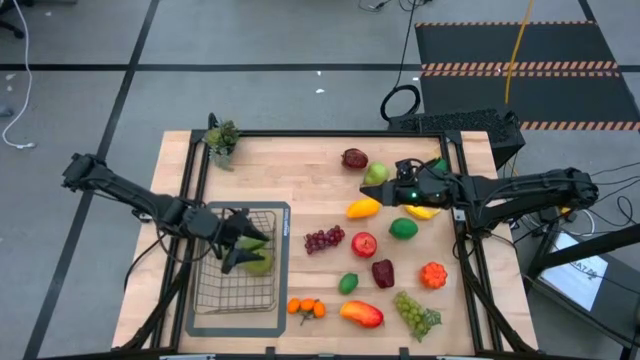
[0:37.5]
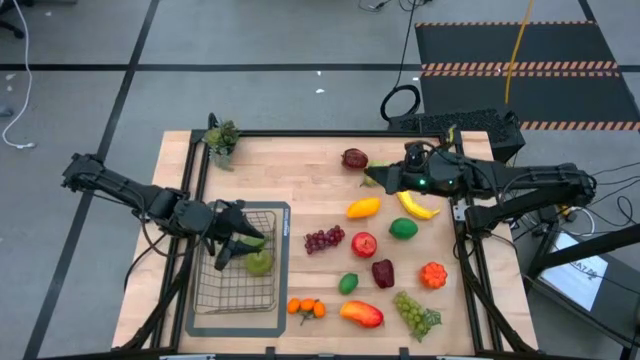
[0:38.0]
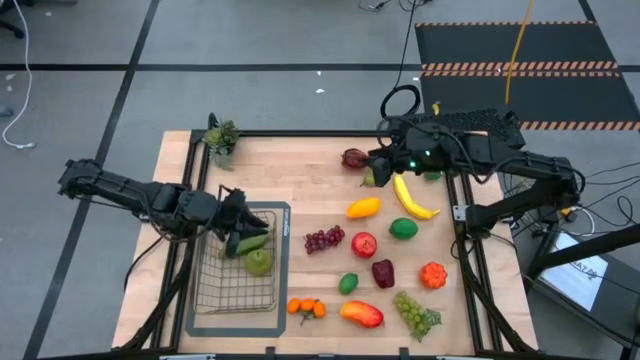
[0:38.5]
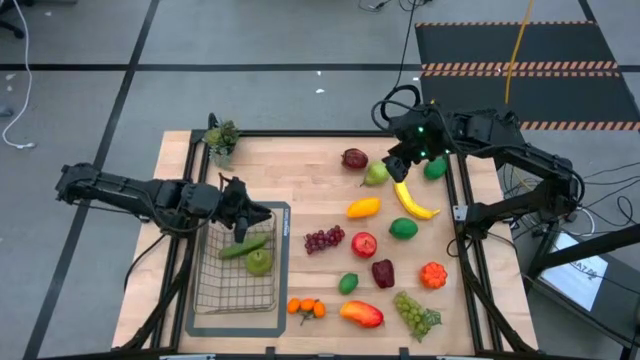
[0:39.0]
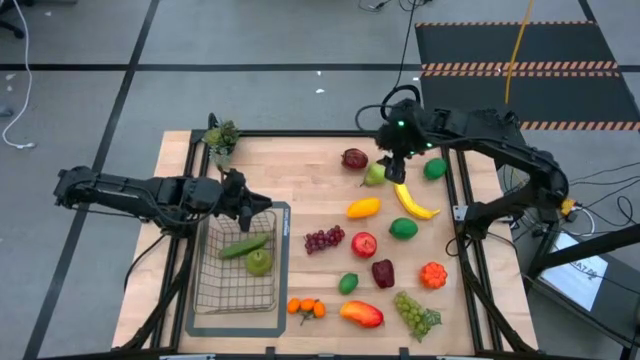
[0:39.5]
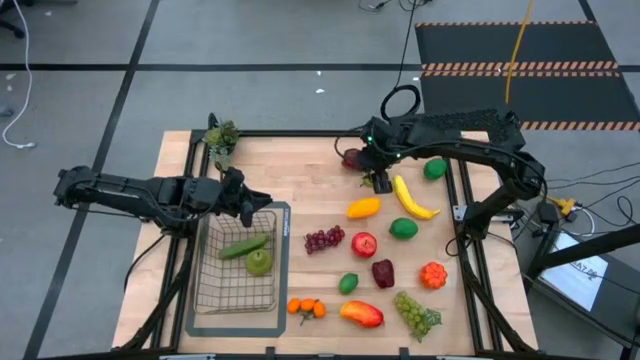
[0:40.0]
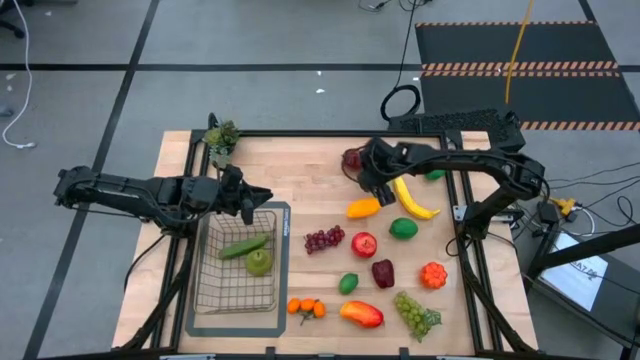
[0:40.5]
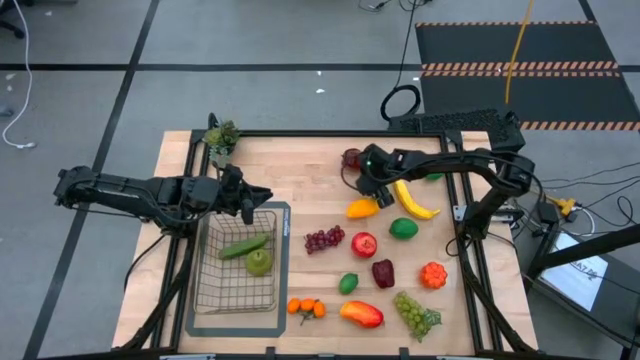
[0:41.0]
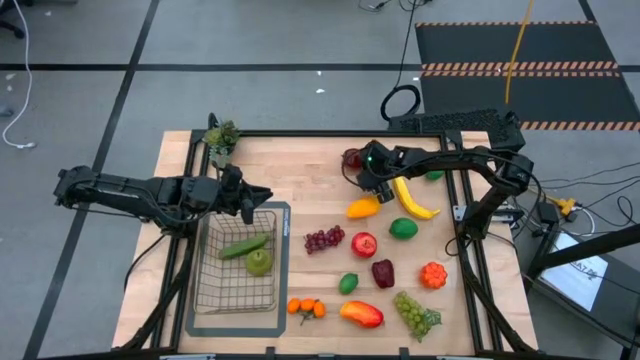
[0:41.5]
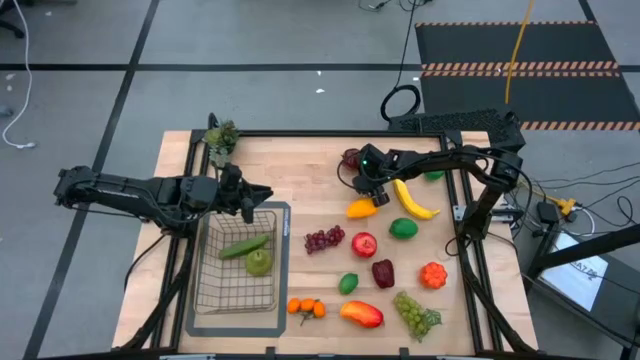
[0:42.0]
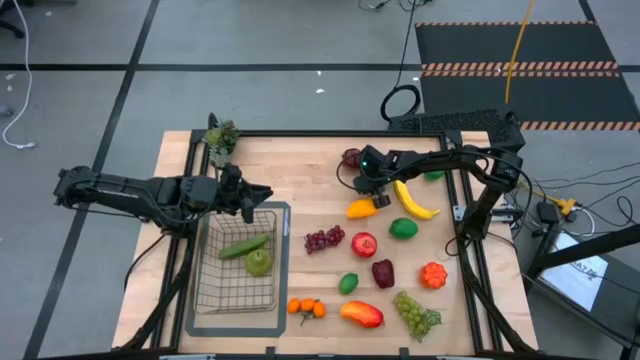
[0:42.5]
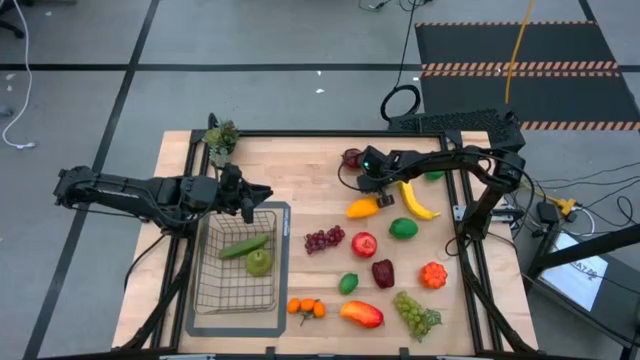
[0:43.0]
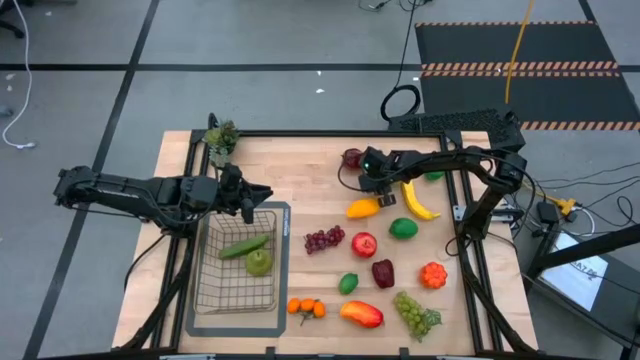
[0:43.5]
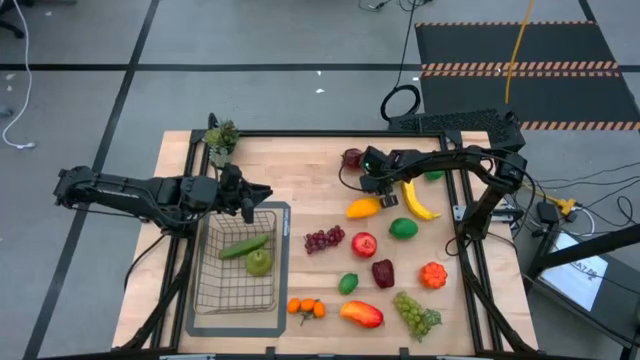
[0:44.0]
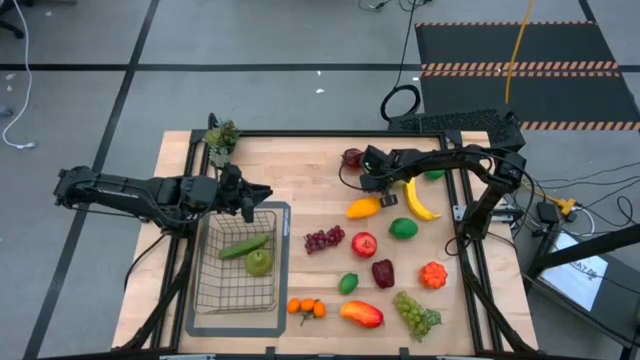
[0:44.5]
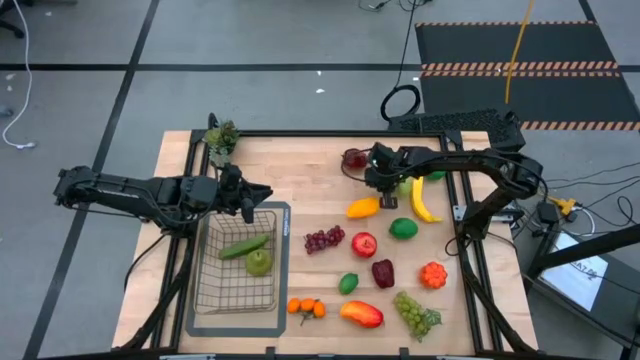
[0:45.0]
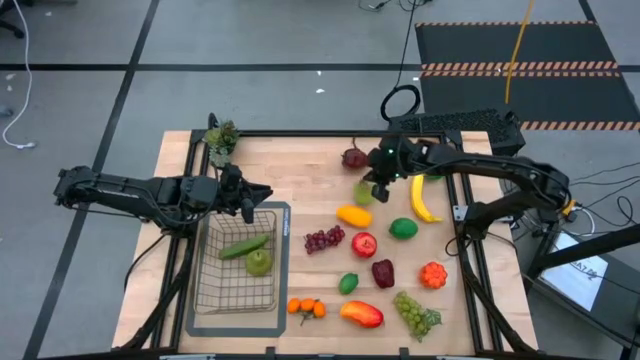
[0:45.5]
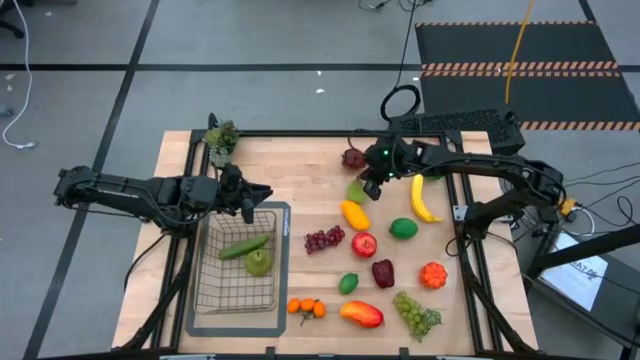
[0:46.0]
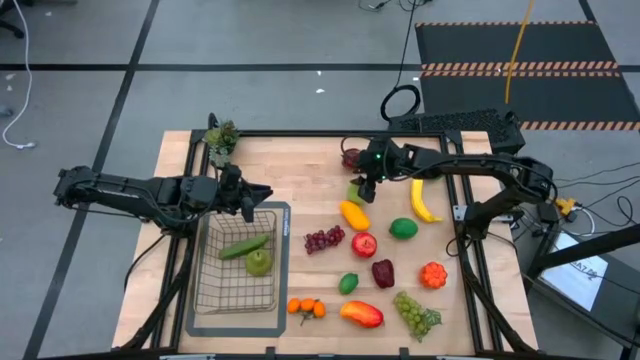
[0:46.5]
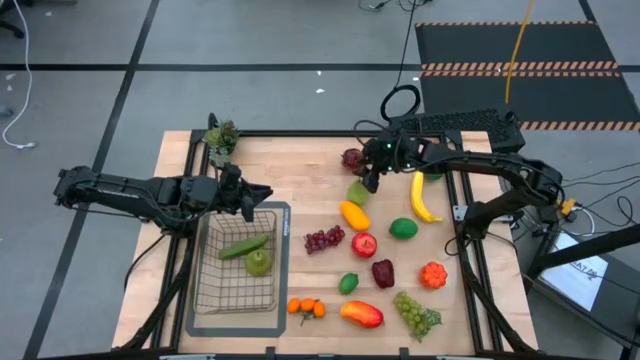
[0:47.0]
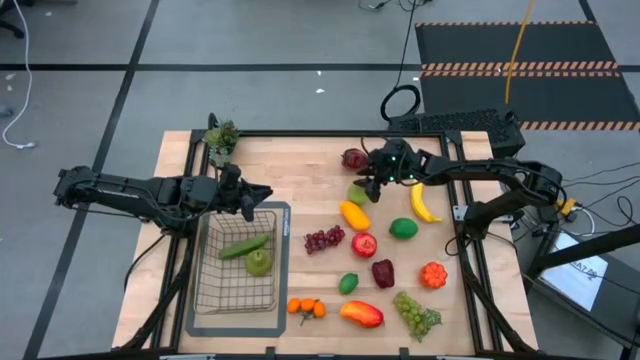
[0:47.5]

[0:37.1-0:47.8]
Task: Build produce basket
Put the green pear into the wire basket

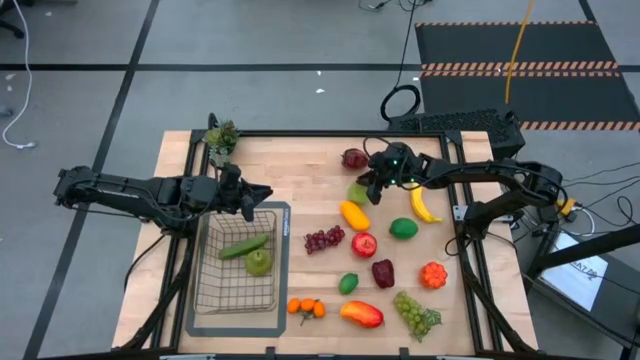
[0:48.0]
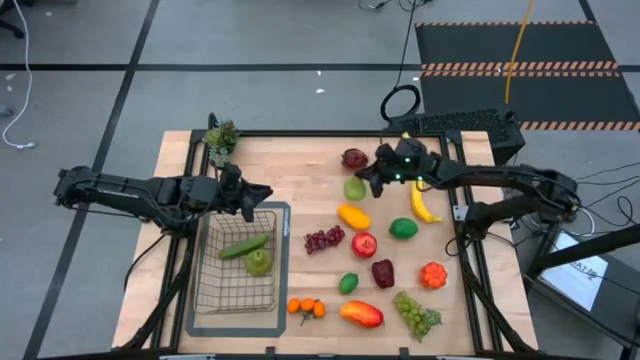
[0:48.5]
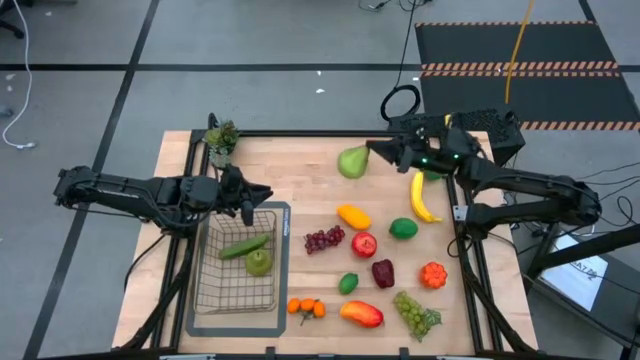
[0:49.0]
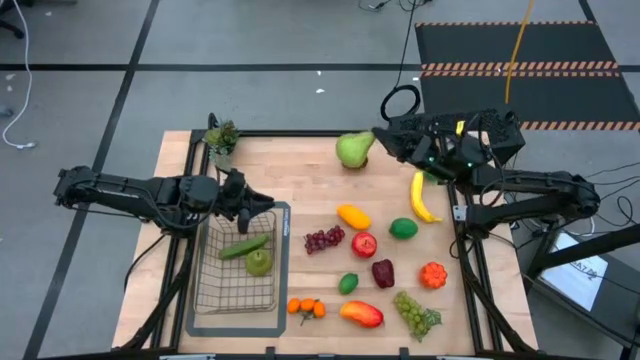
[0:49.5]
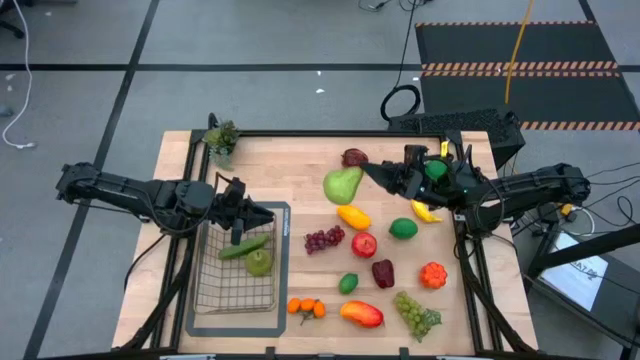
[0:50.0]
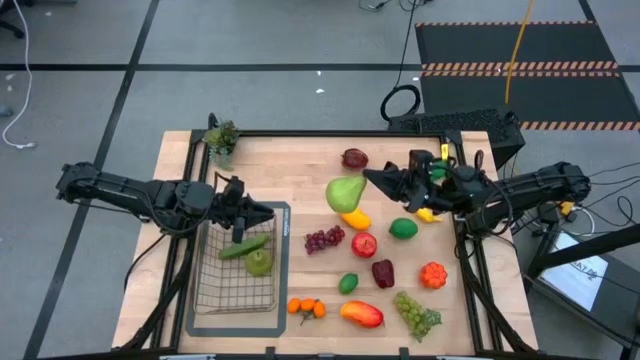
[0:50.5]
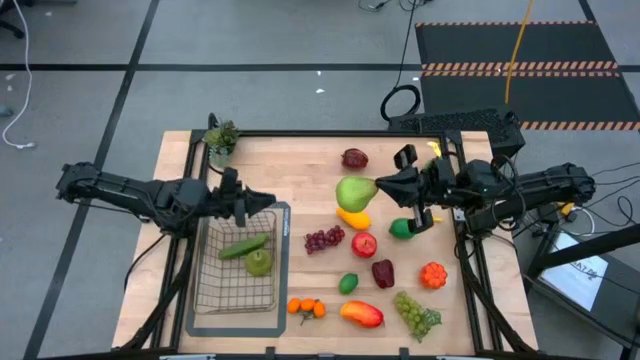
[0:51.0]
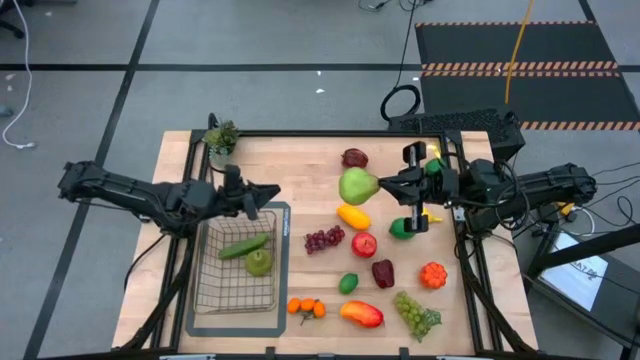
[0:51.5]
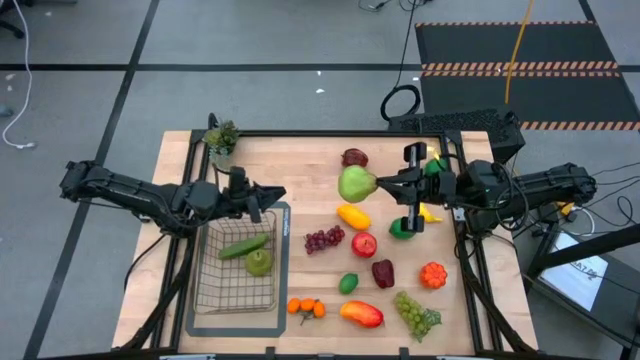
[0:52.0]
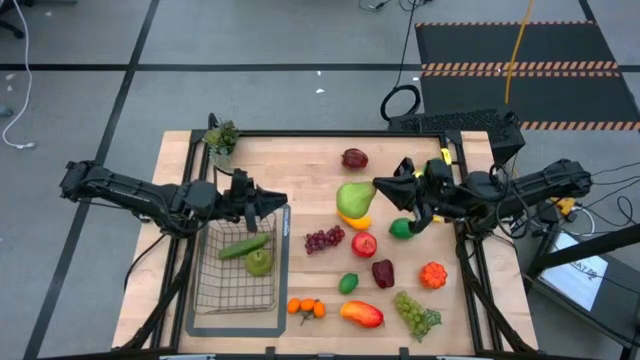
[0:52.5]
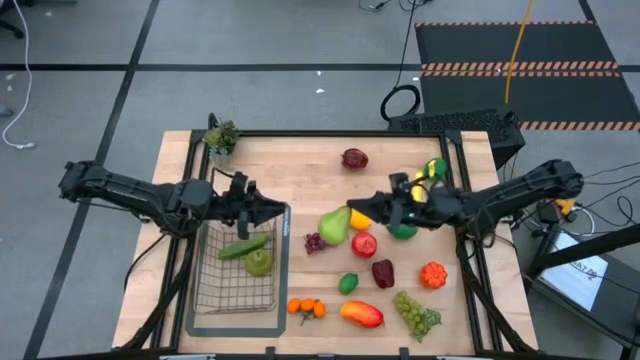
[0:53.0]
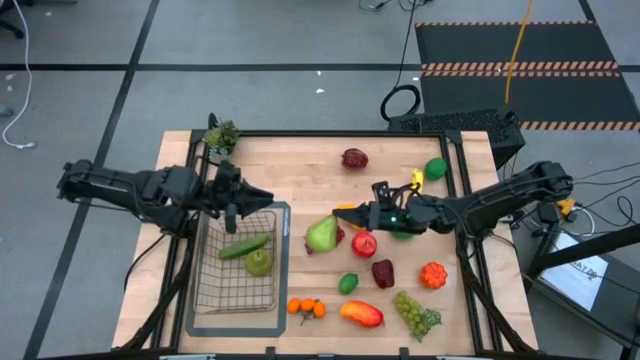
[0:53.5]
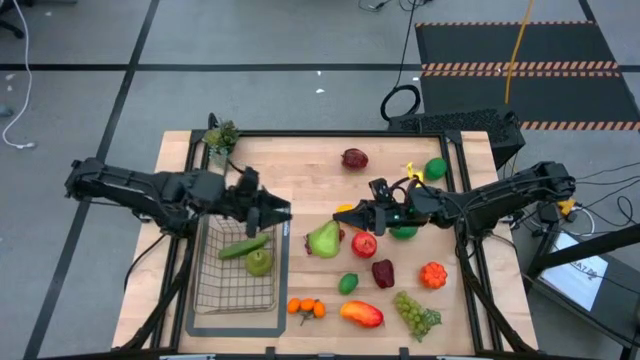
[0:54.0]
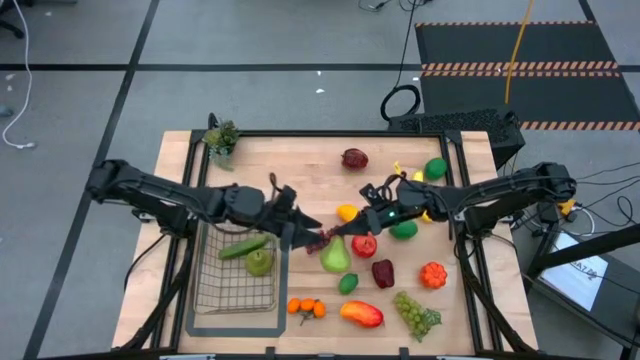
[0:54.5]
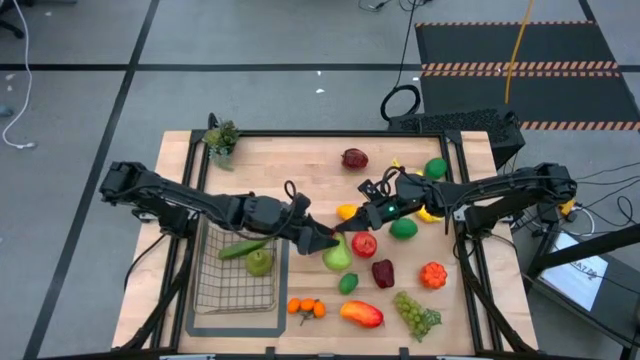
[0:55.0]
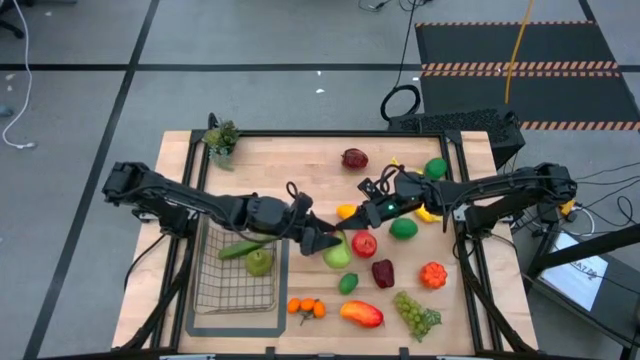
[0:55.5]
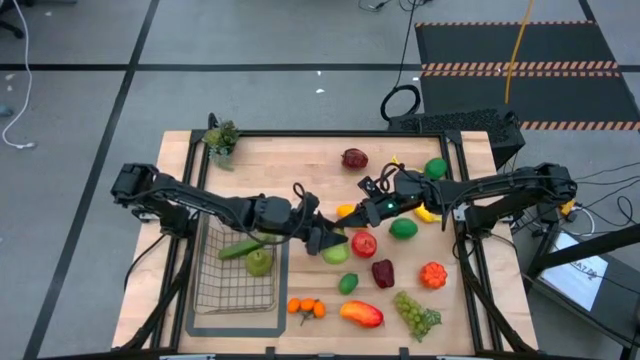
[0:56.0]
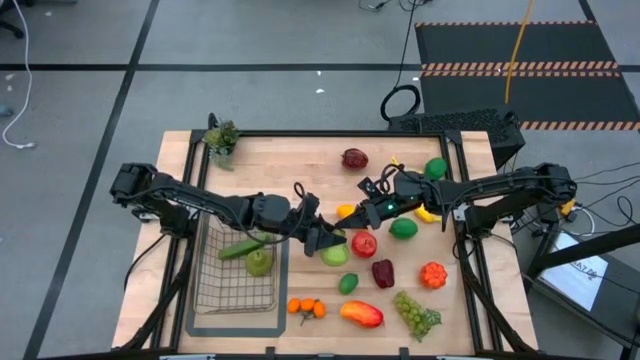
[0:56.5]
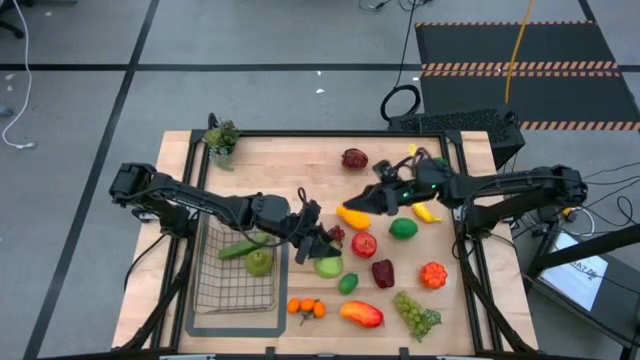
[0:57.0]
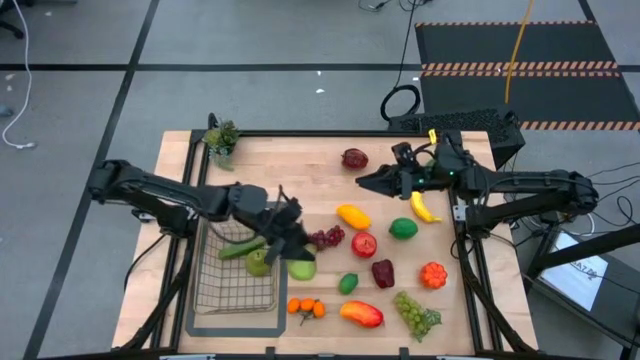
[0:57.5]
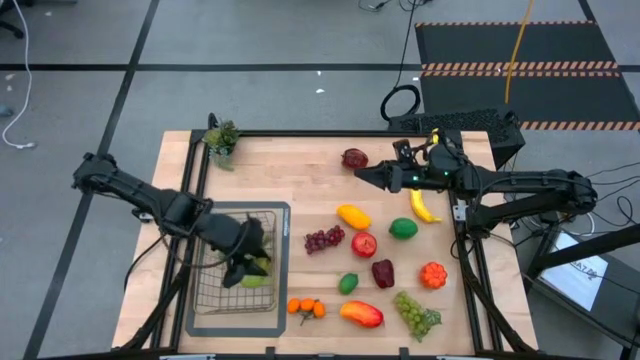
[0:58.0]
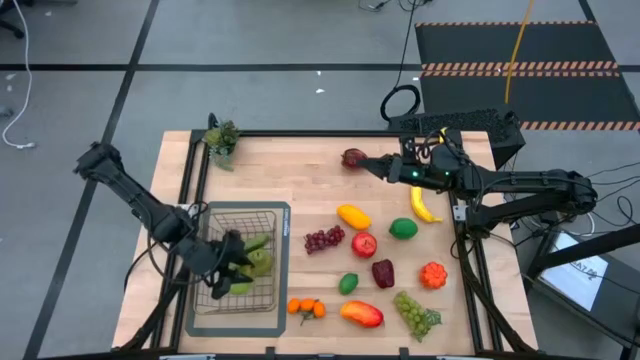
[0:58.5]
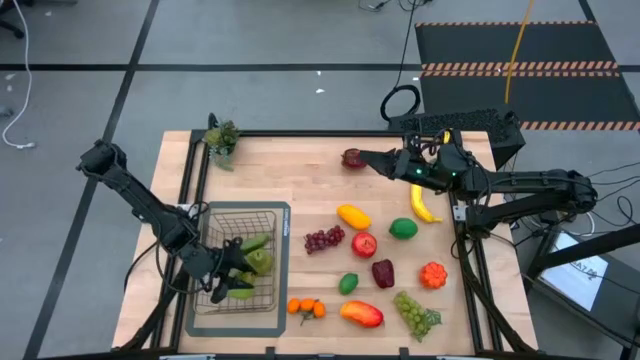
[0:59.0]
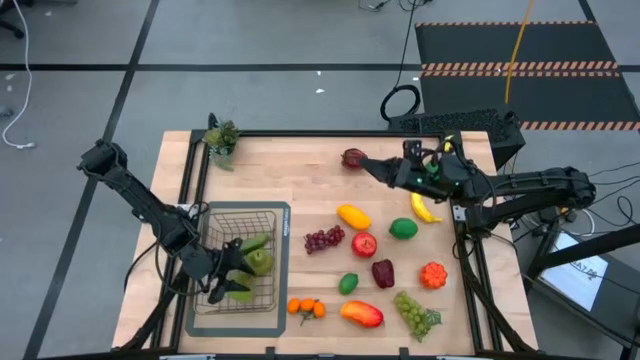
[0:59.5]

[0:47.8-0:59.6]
Put the green pear into the wire basket
